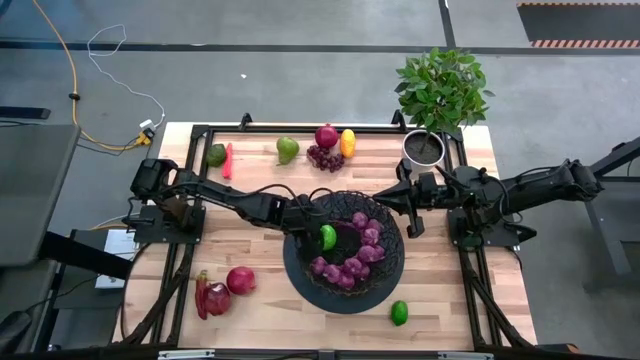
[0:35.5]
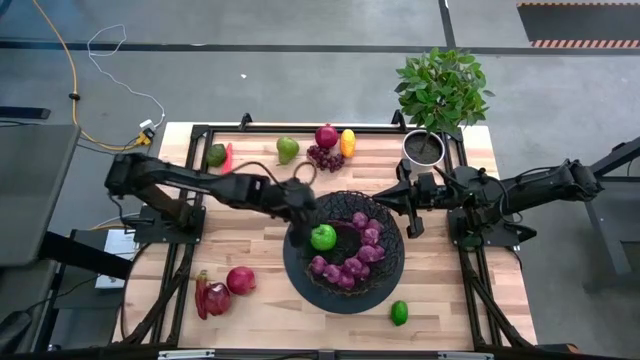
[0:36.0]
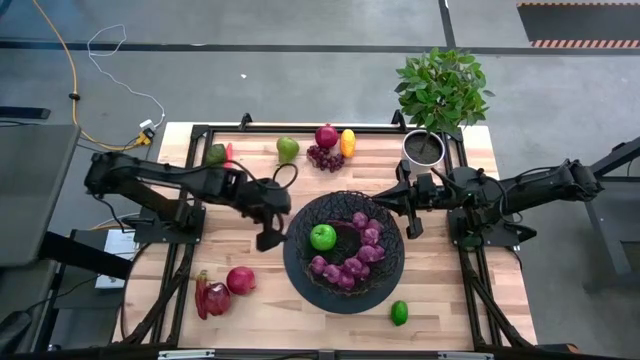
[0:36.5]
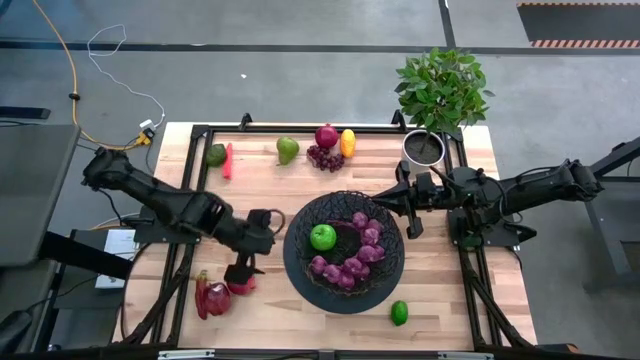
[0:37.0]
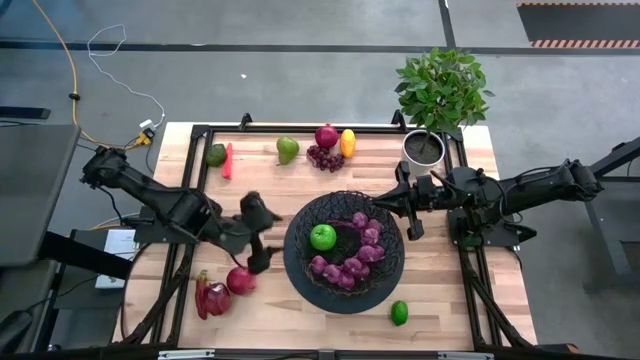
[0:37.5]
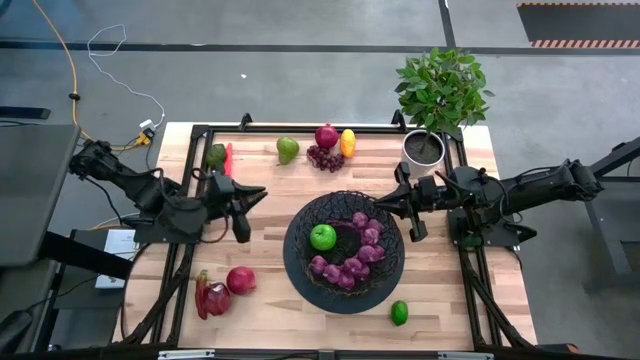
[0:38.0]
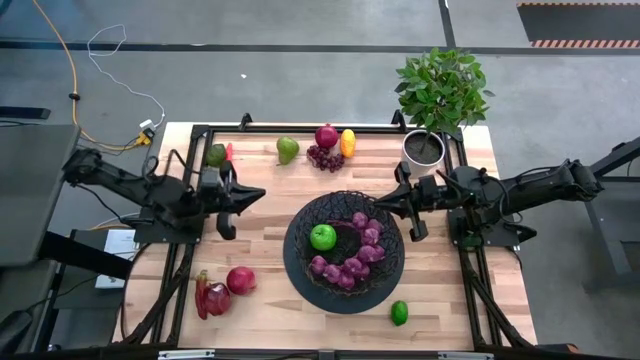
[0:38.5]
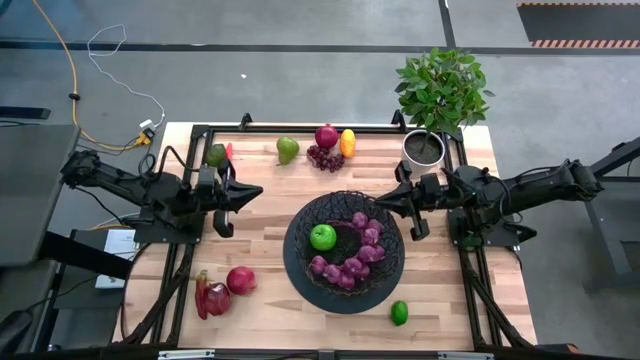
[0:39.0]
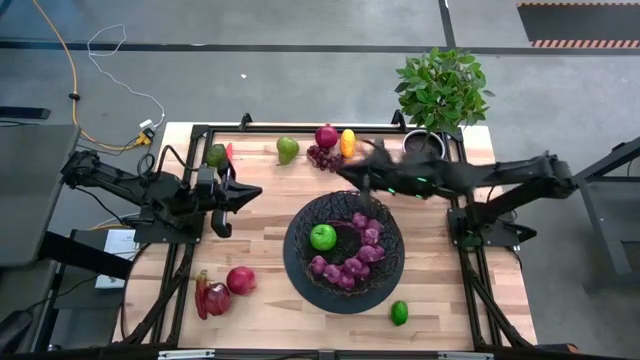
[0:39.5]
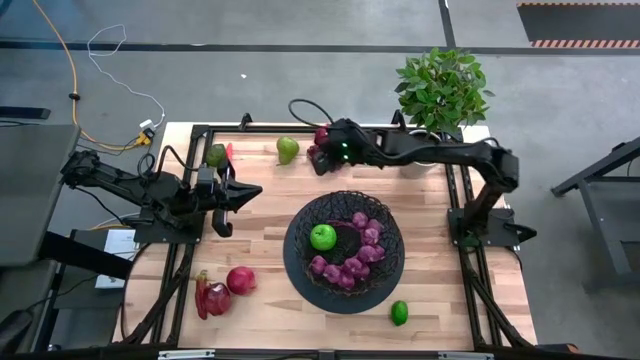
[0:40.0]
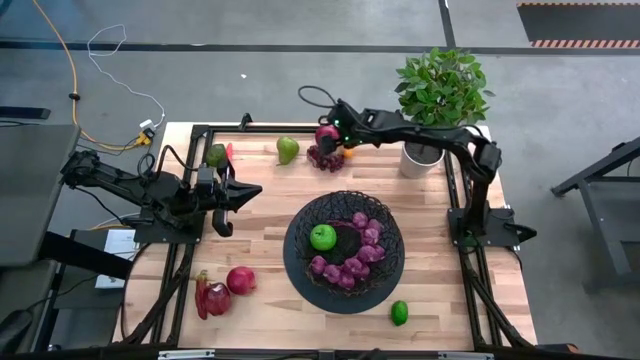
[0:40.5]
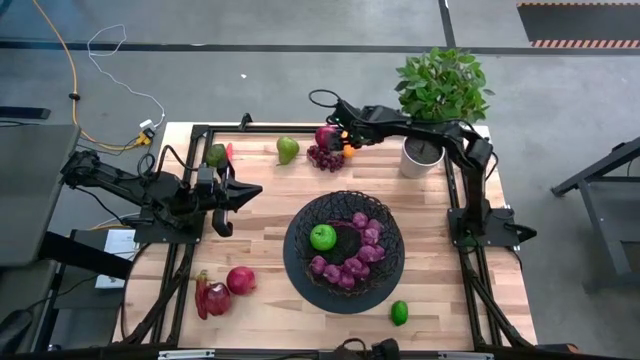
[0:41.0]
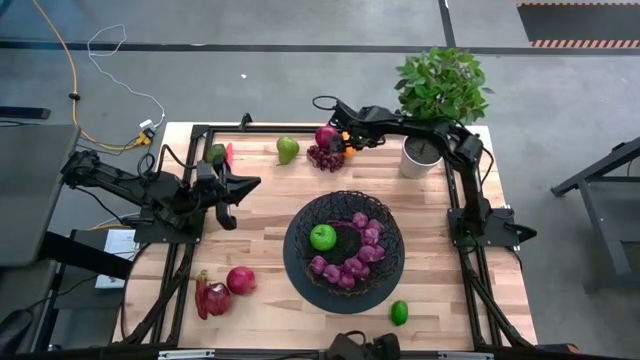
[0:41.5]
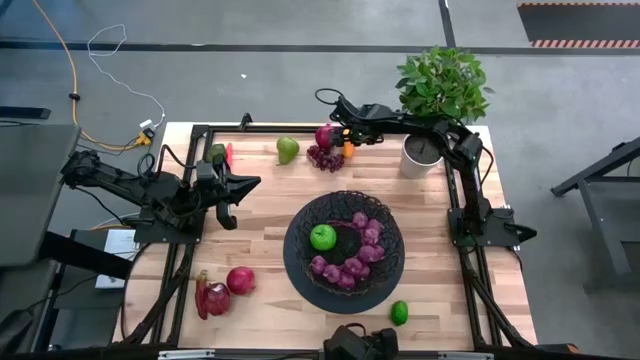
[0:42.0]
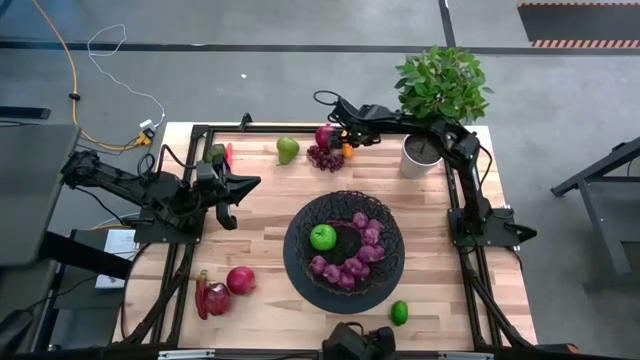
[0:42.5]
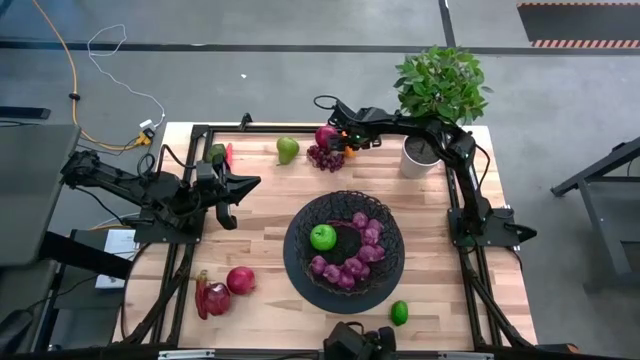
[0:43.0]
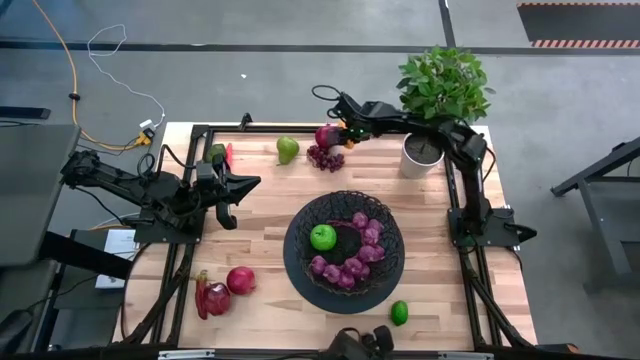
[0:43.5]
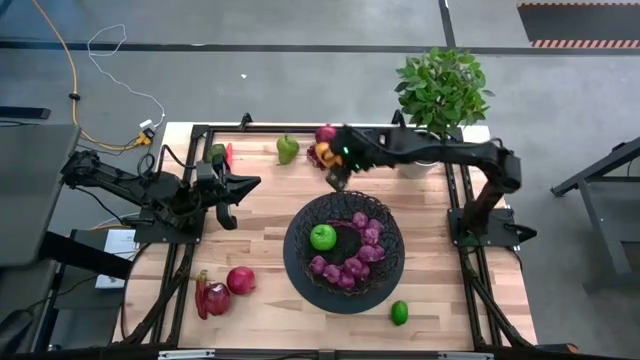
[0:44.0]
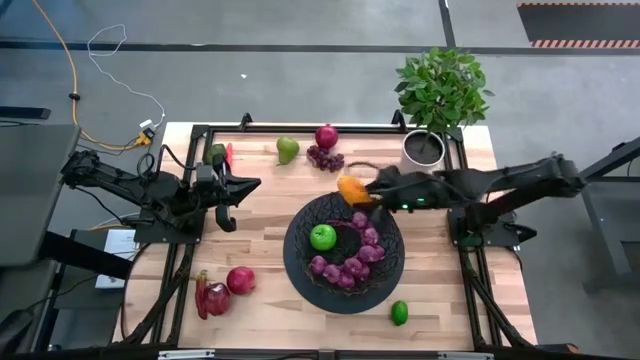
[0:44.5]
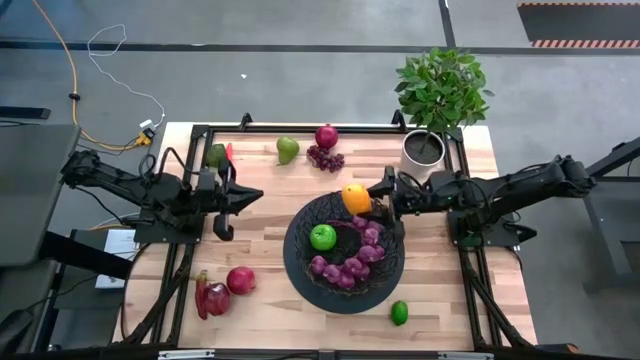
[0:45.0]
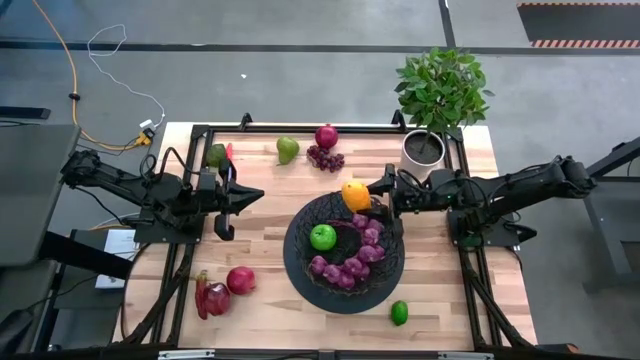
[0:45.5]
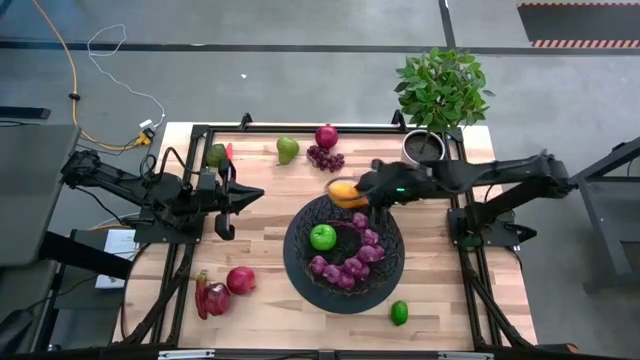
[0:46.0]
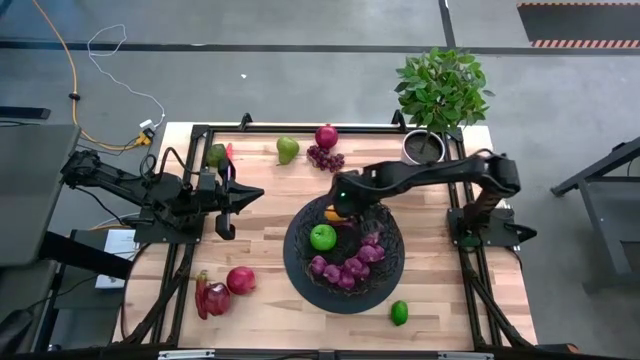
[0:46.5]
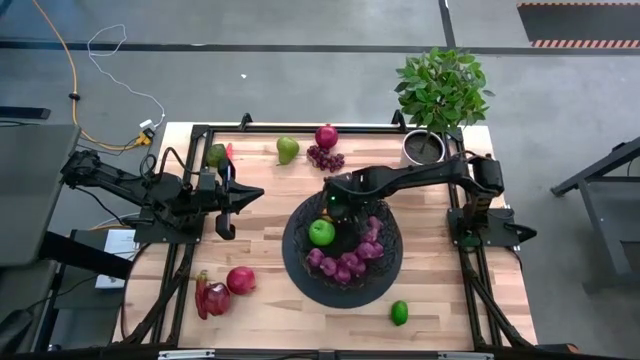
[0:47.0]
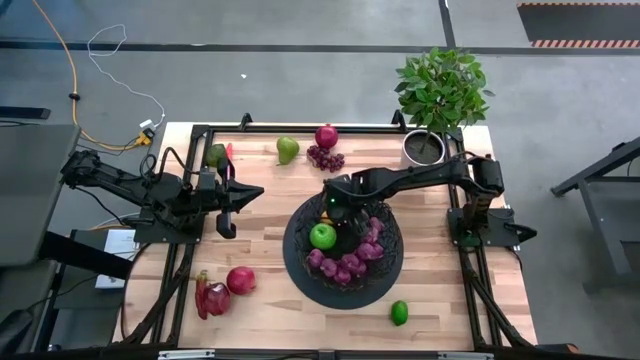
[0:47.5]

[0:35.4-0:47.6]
Task: Build produce basket
Put the yellow mango into the basket

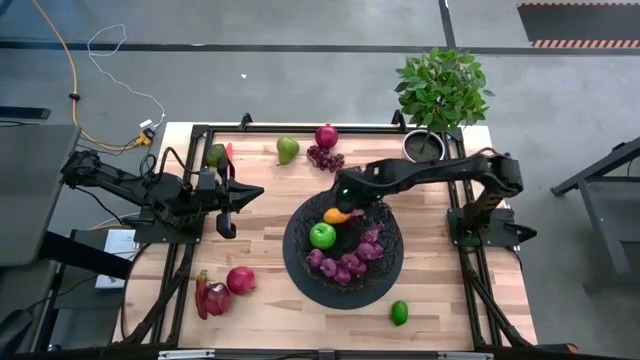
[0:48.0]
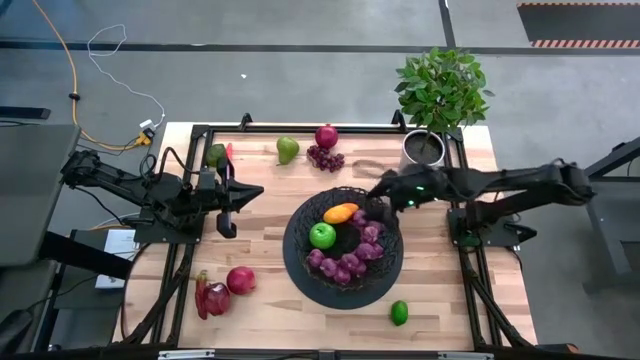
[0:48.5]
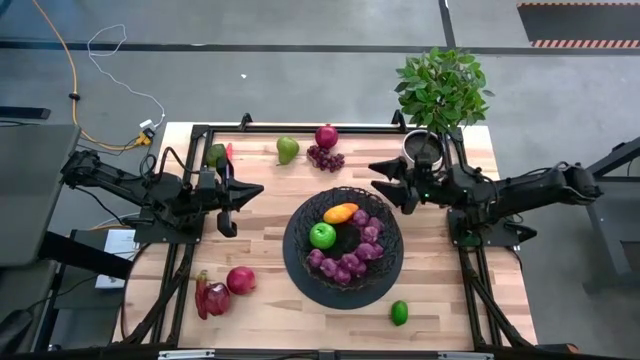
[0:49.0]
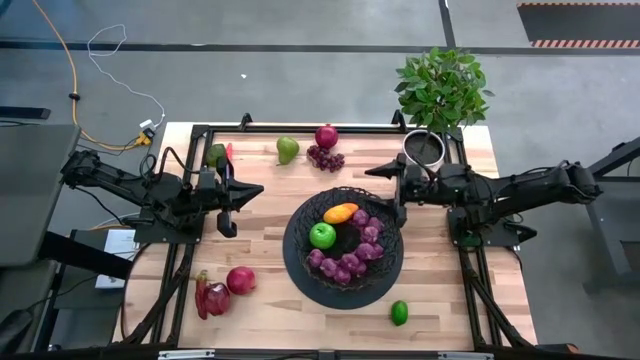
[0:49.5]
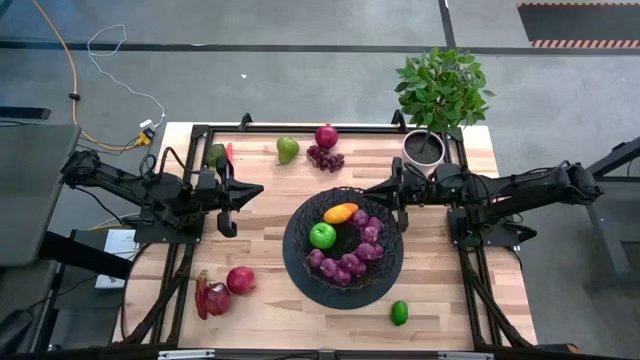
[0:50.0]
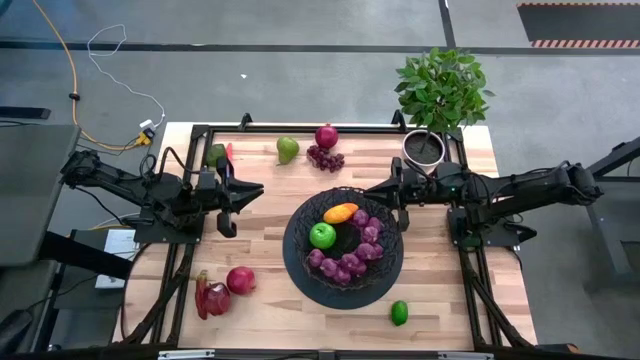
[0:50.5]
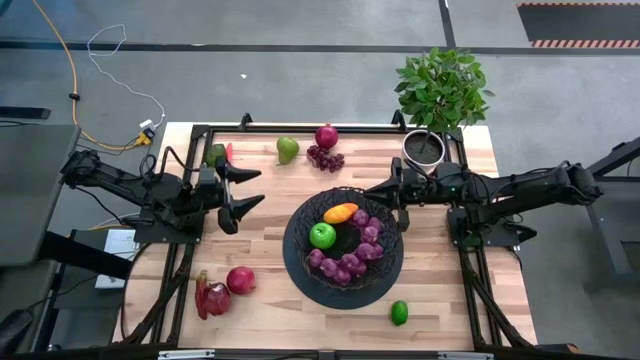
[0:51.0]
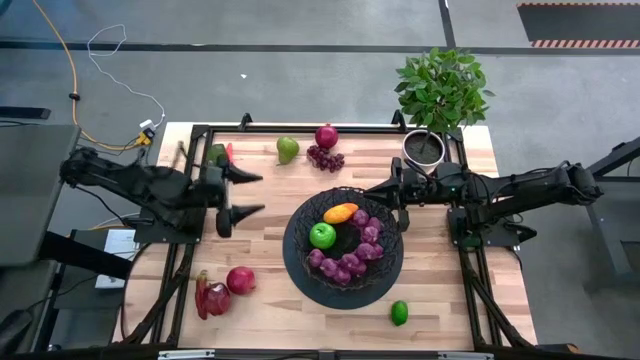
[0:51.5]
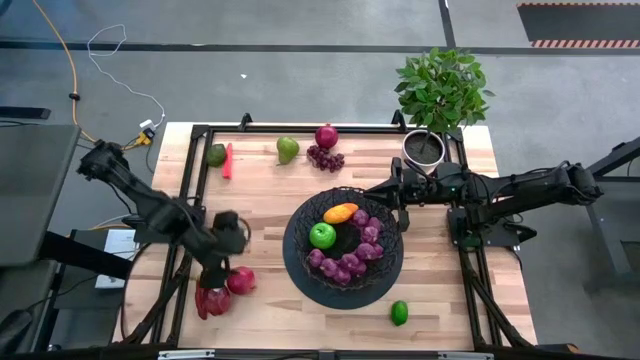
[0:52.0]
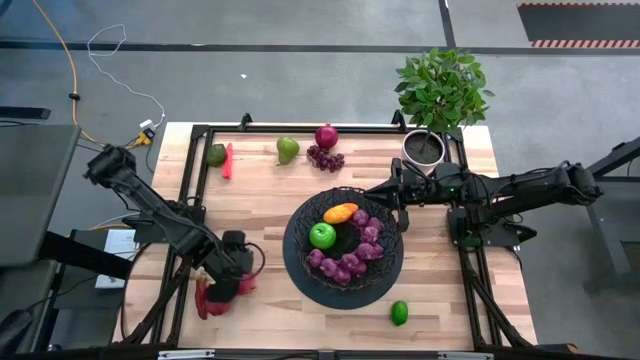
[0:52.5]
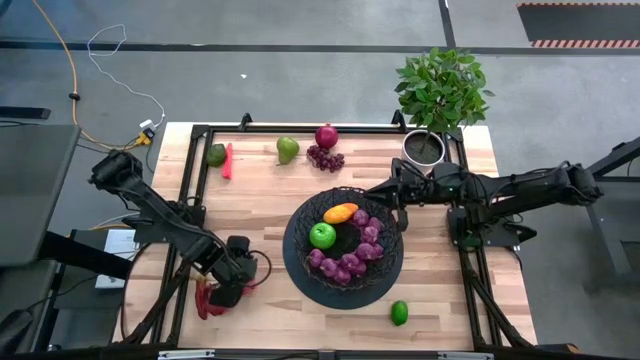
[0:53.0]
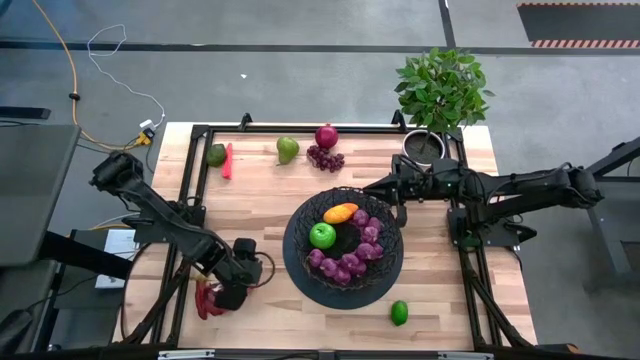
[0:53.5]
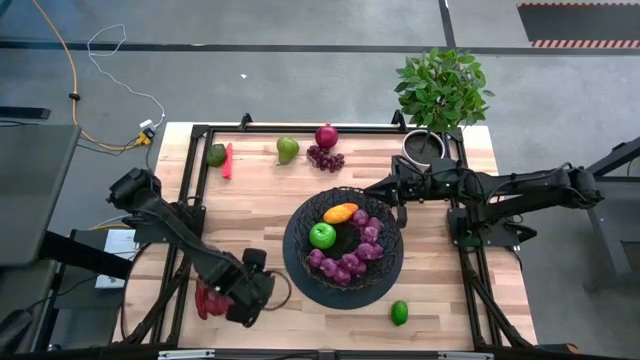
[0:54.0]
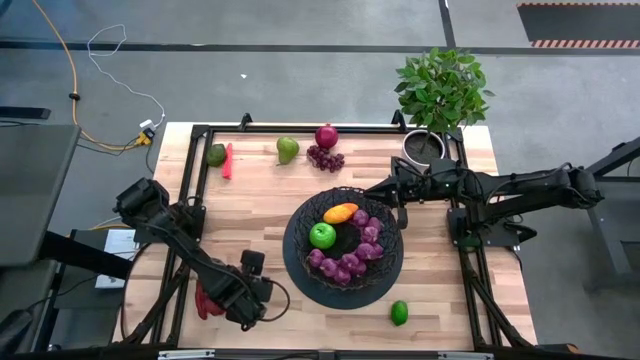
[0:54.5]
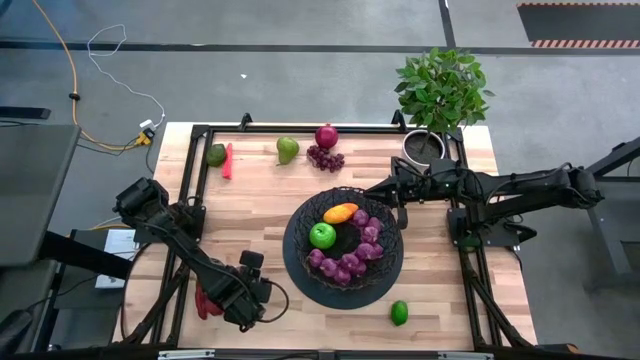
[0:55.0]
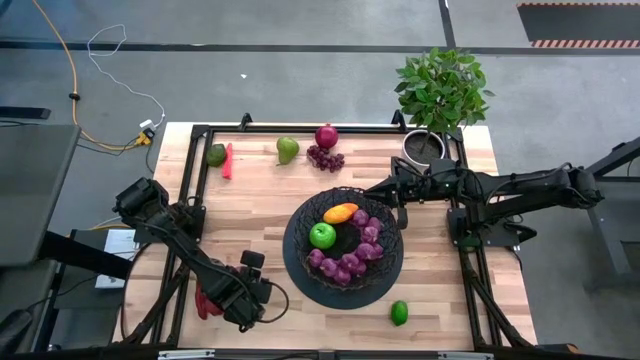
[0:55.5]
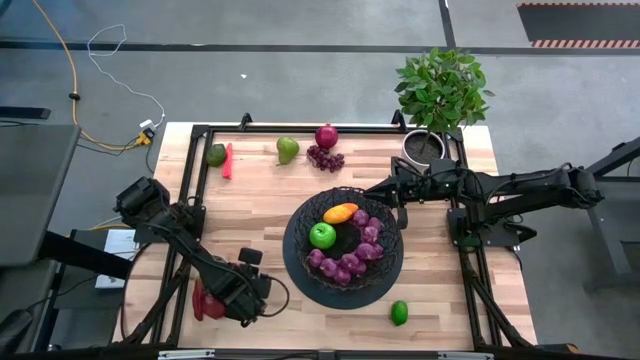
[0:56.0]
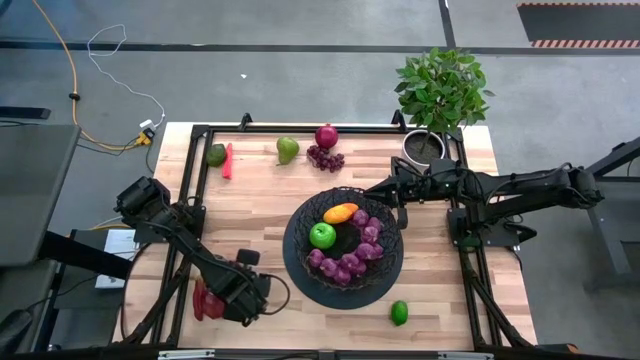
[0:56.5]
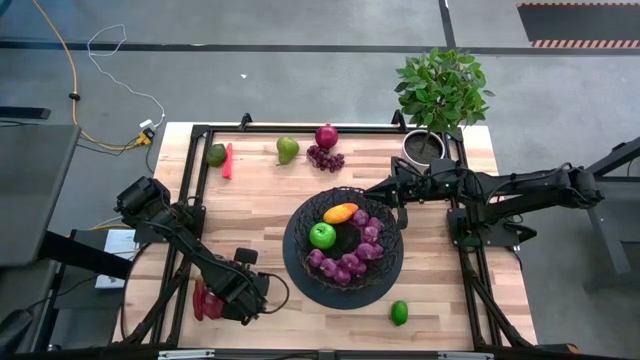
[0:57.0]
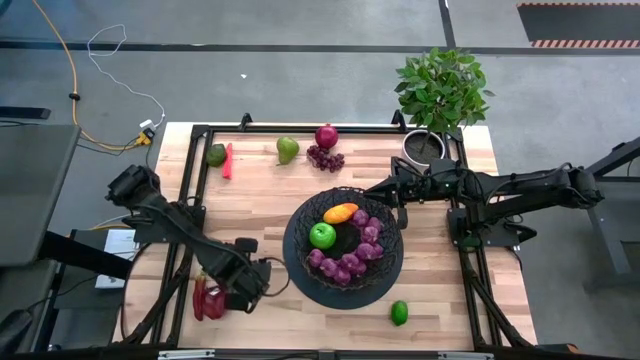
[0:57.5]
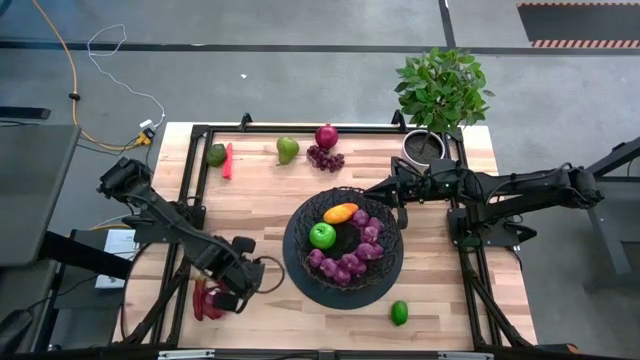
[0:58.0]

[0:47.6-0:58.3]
Put the red pomegranate into the basket
